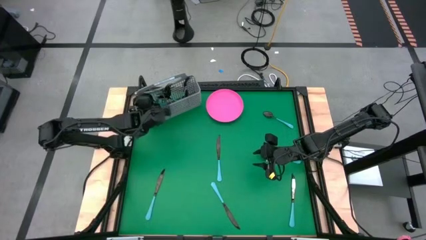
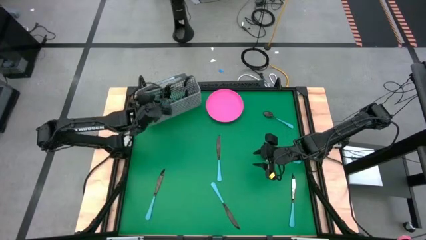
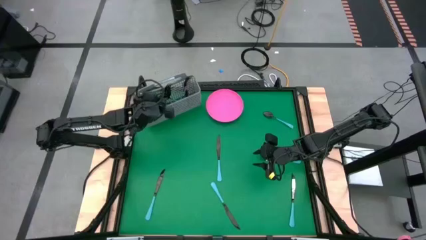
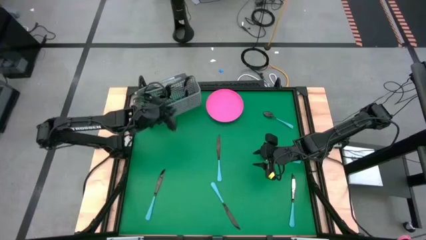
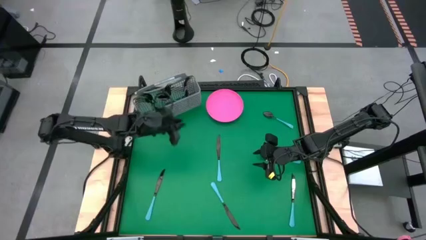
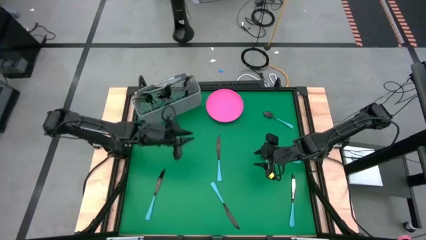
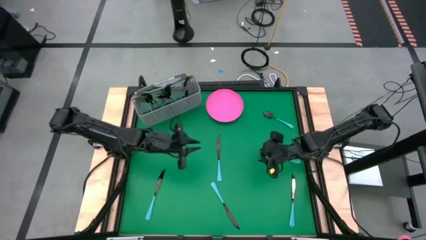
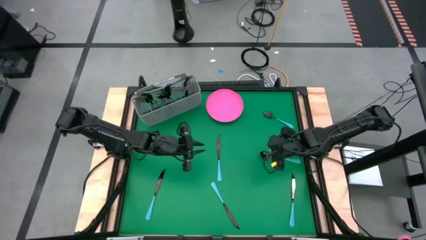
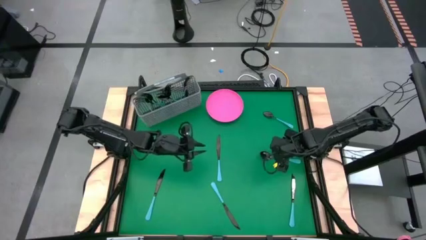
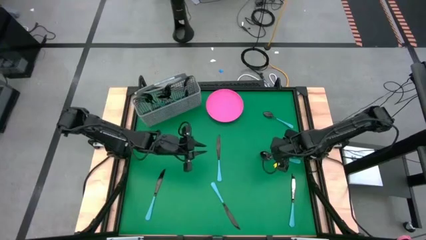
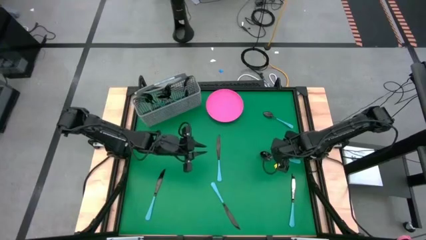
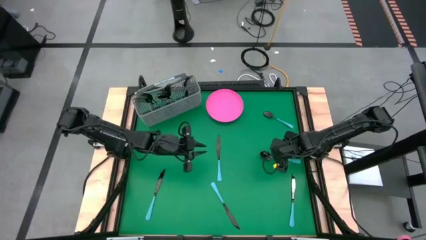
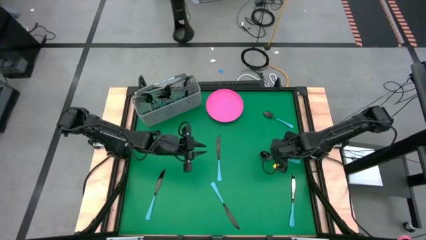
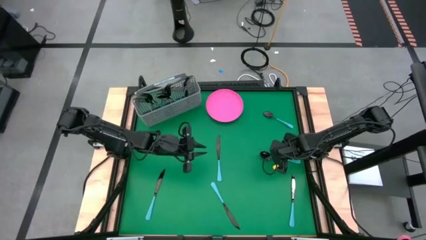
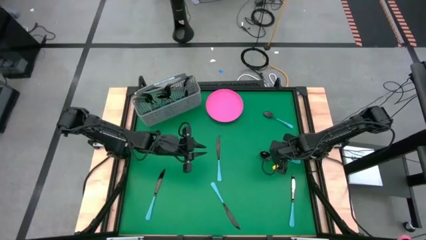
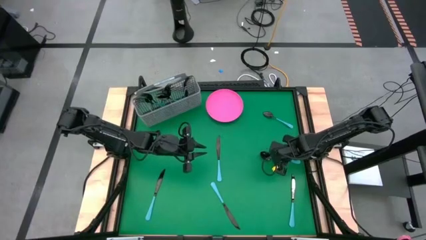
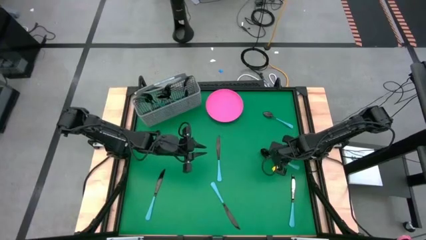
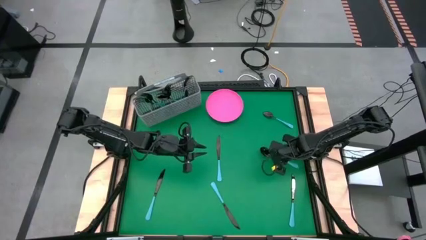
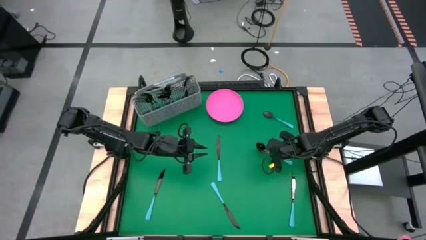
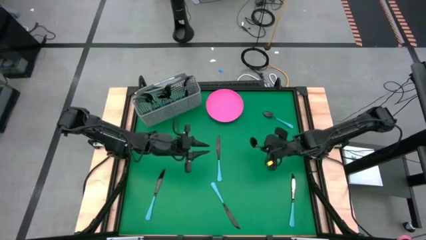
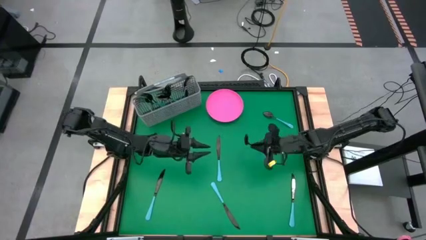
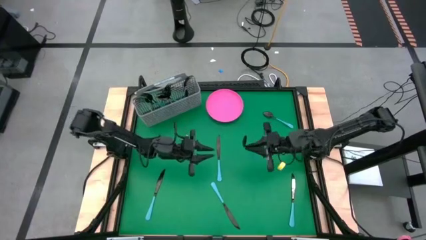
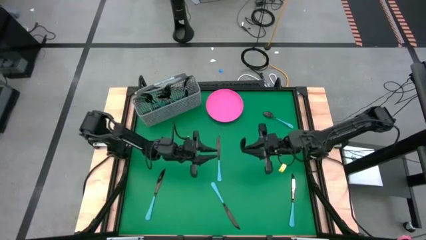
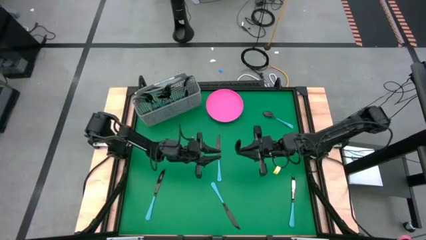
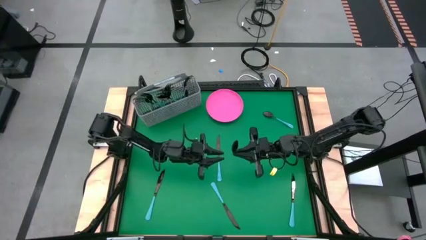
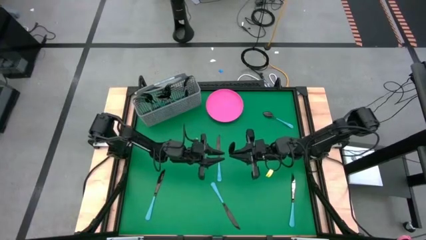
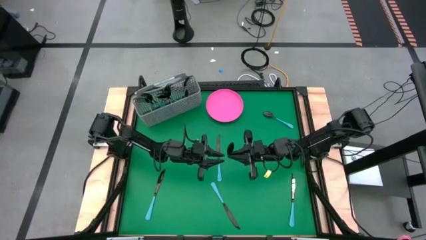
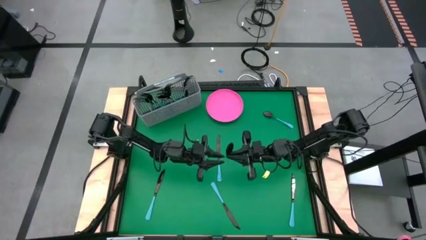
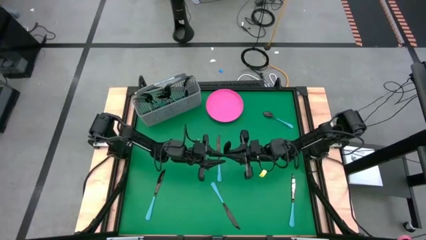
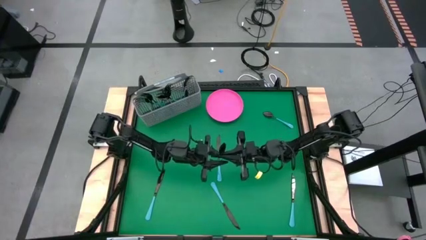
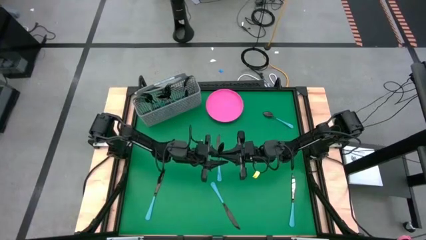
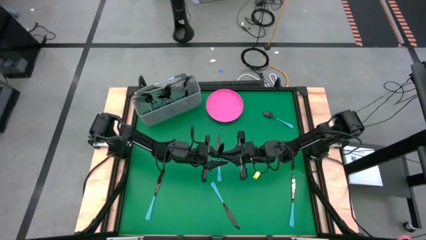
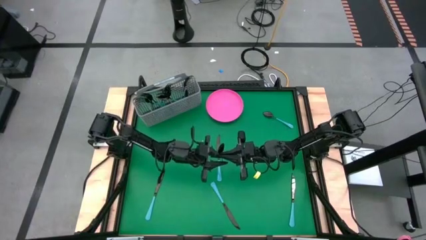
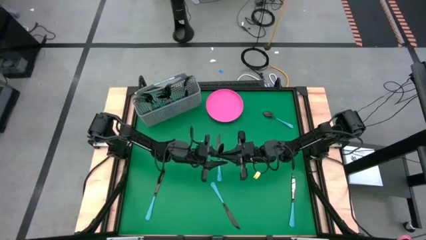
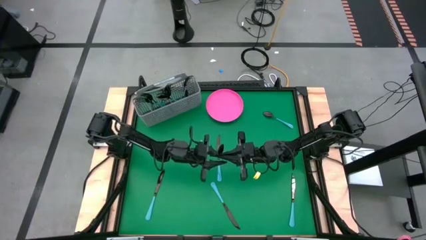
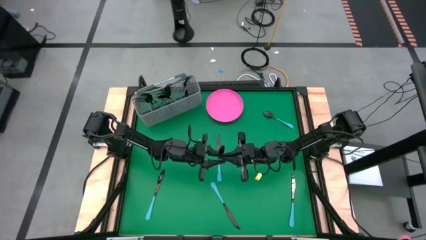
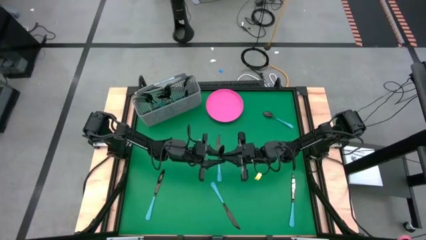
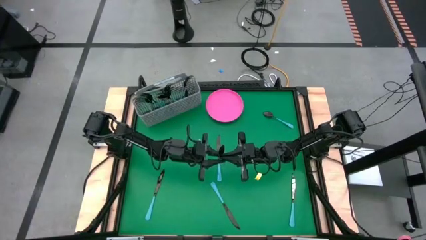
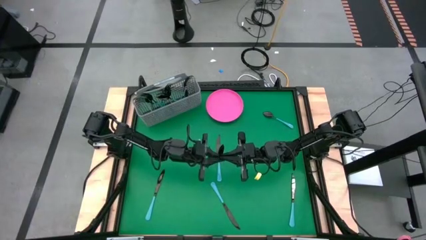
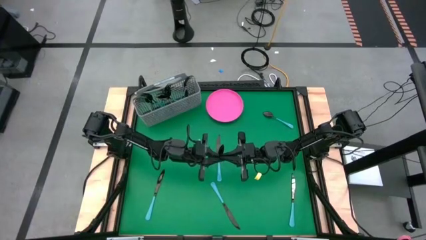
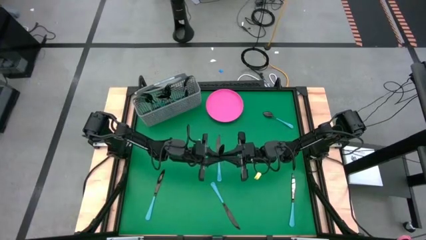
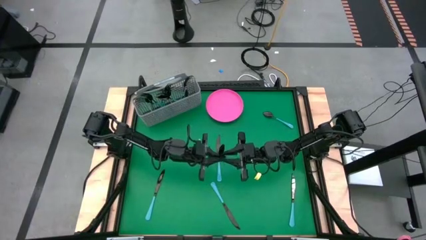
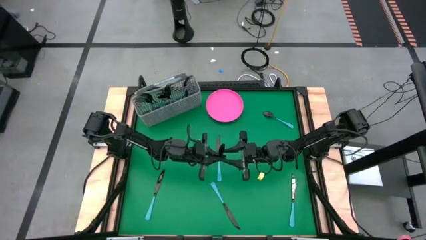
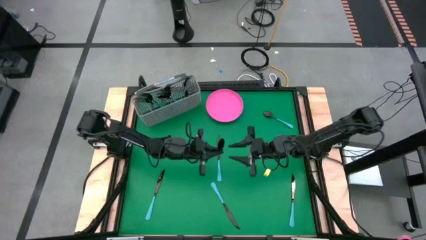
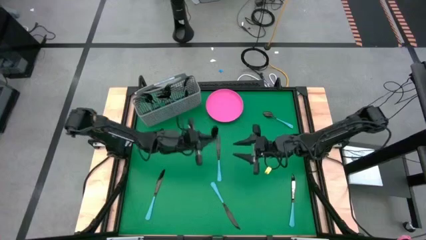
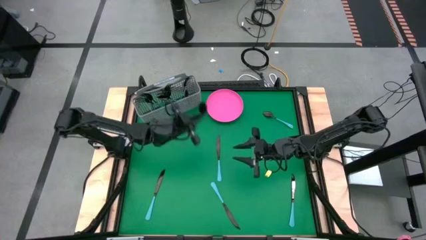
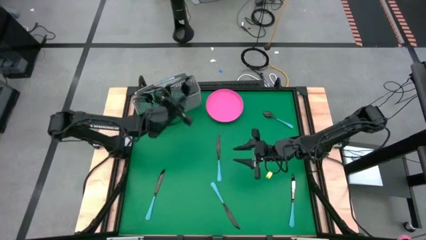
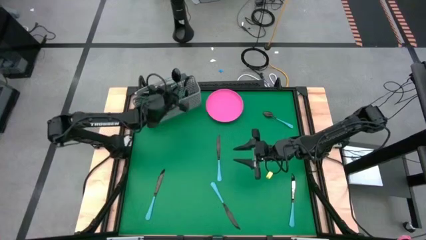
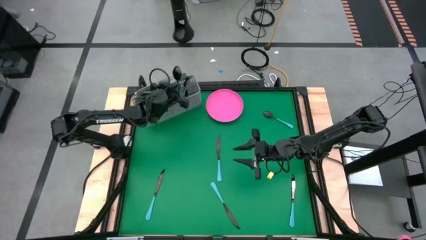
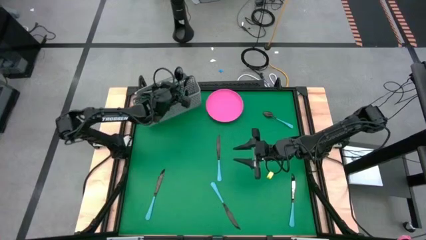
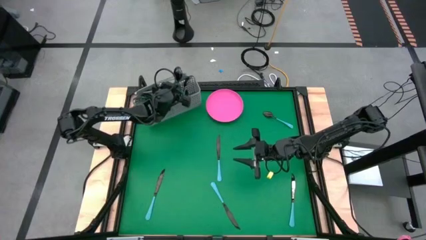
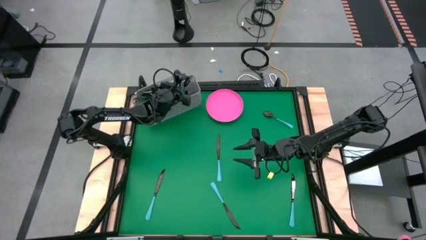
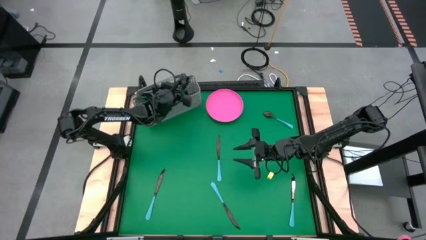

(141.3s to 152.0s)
Task: Sort silverware
Put the blue spoon into the gray silverware holder

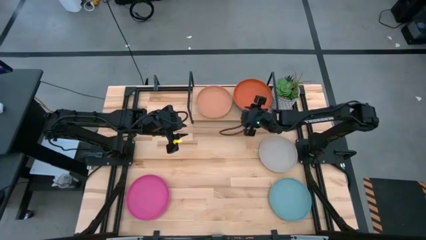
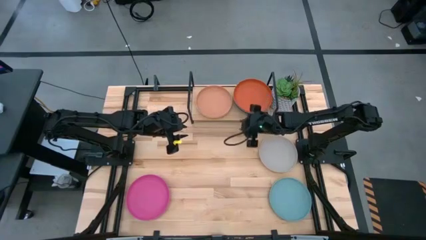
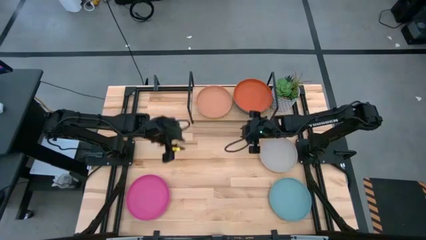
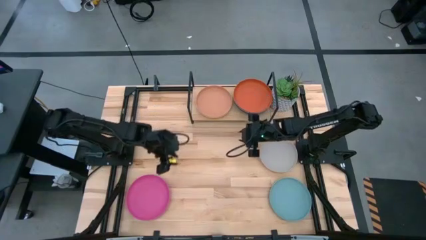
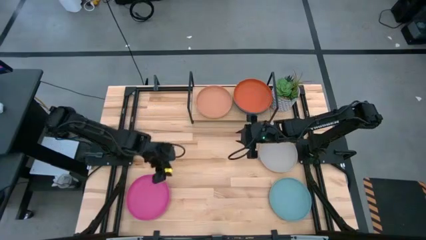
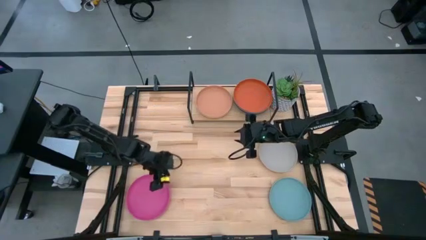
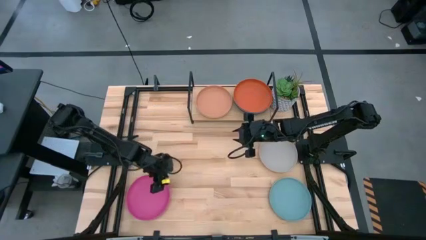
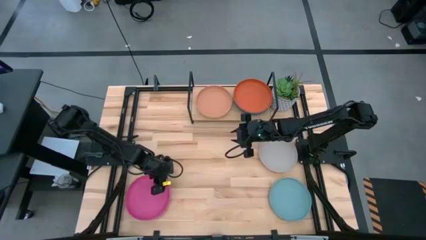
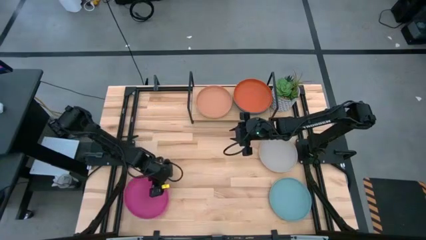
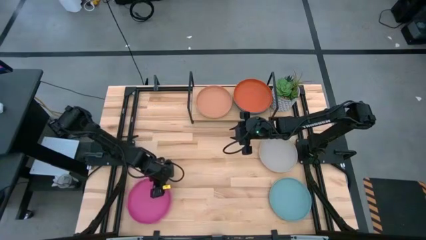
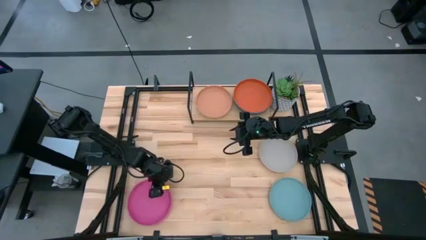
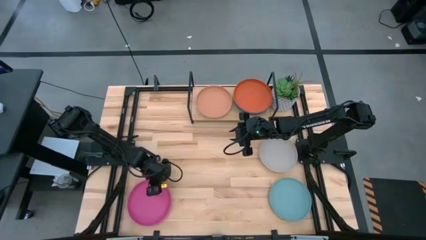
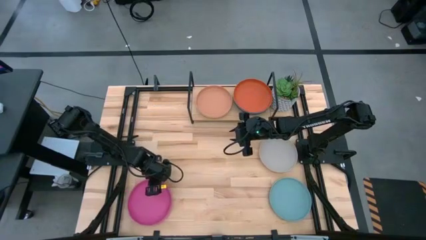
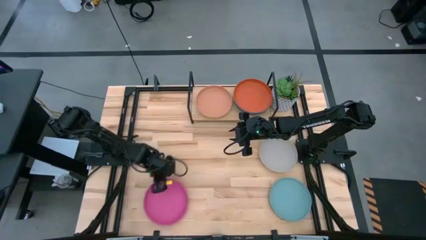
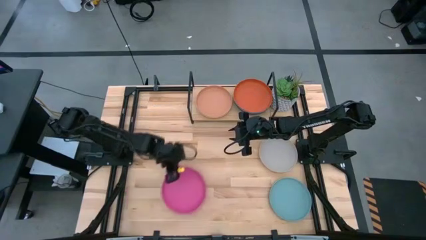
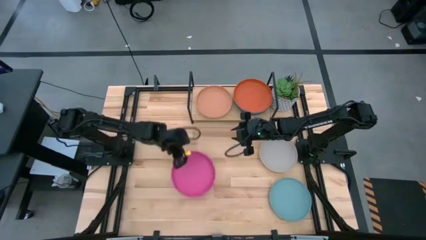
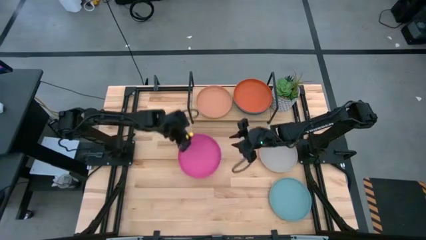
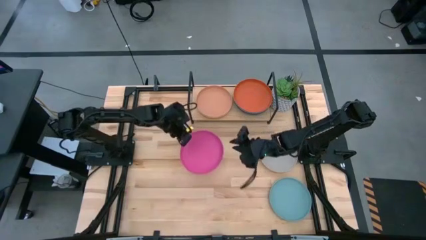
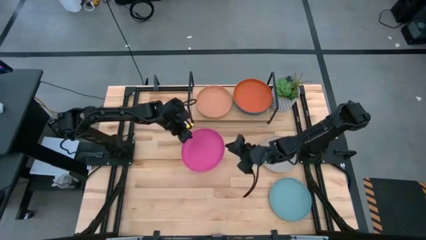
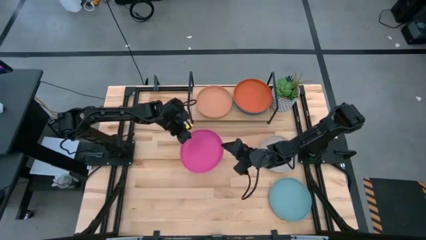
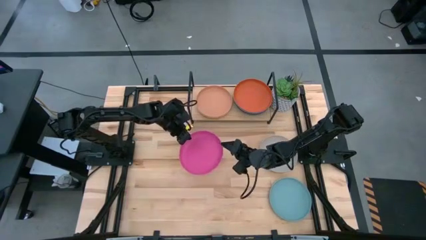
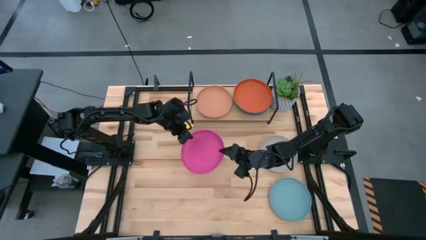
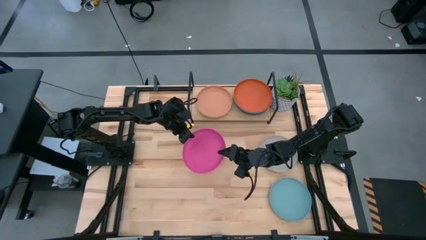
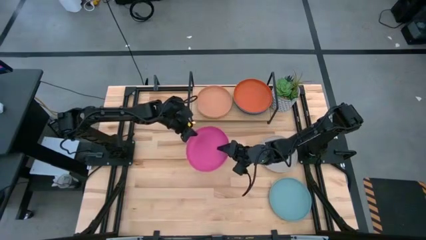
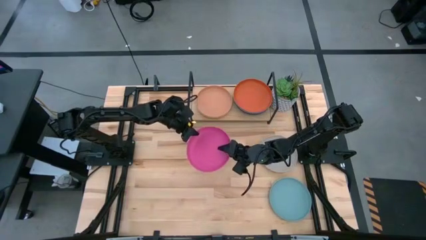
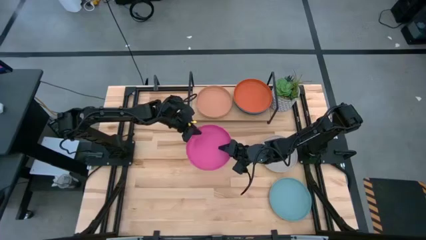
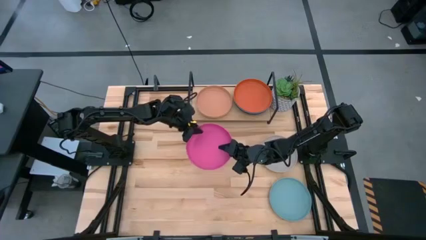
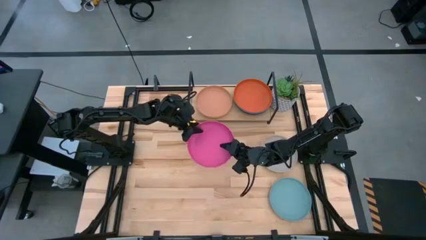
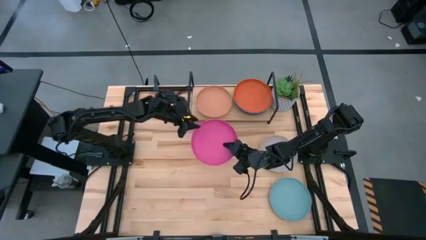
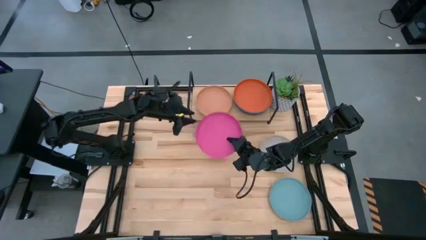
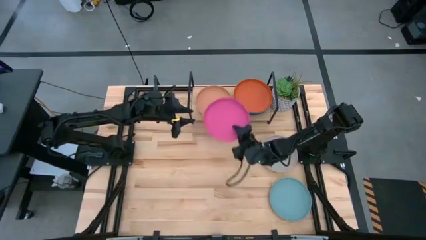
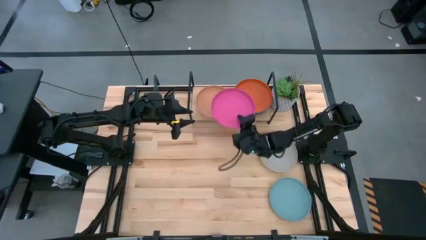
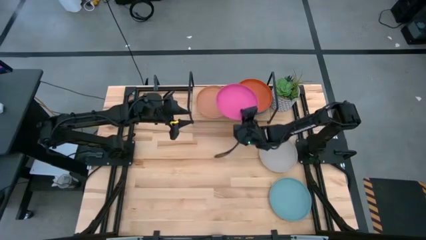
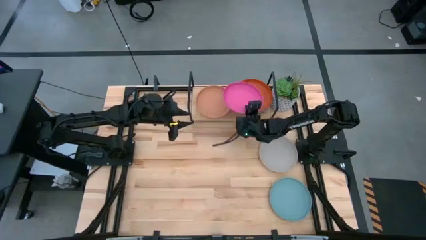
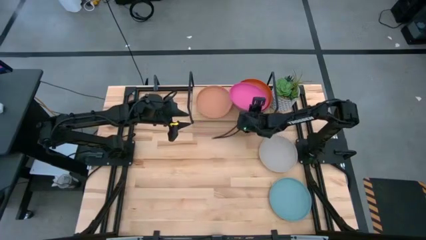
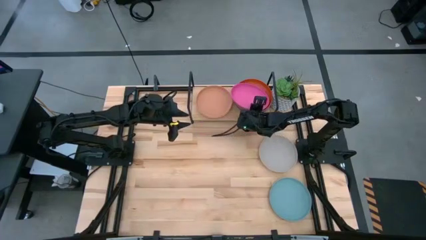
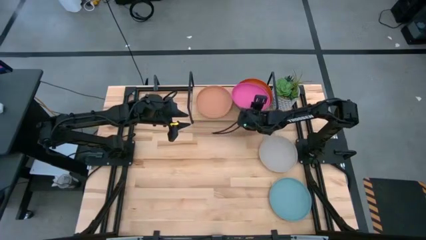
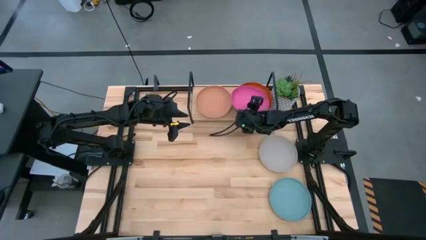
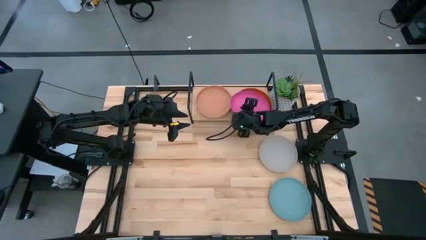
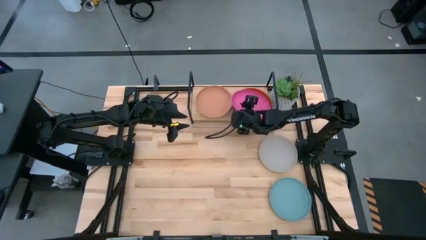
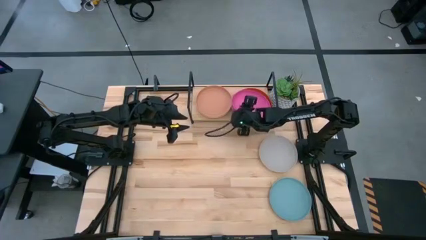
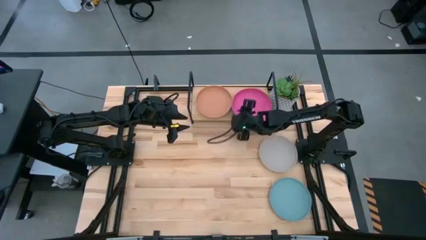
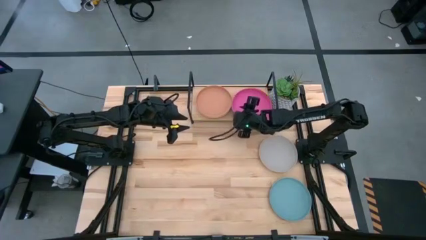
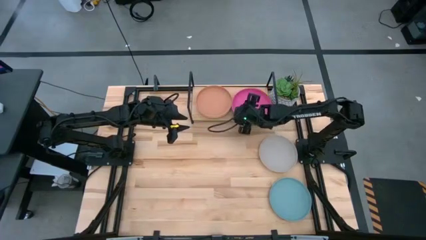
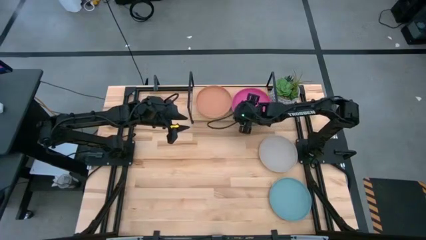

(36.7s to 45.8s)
Task: Place and stack plates onto a shelf
Stack the pink plate on top of the orange plate on the shelf
